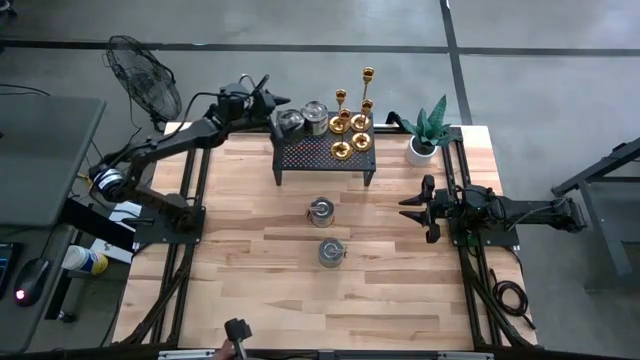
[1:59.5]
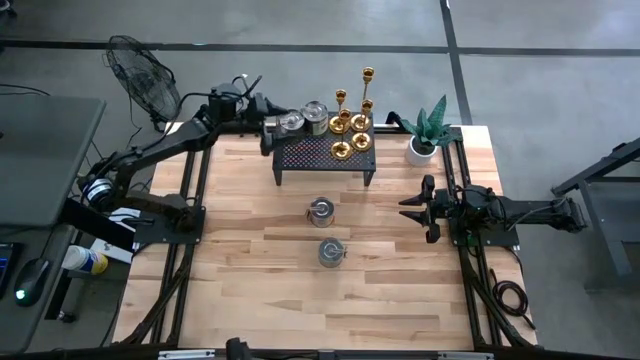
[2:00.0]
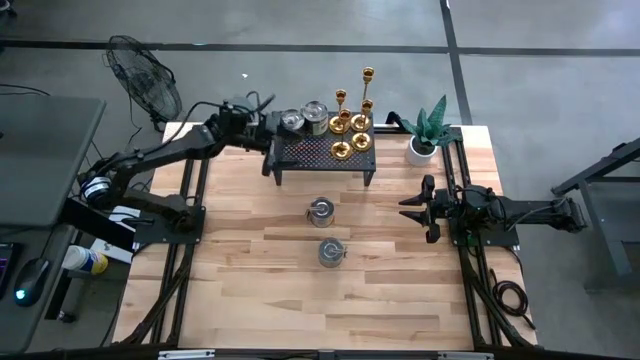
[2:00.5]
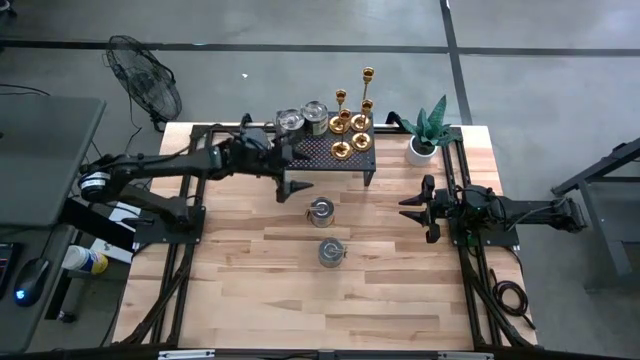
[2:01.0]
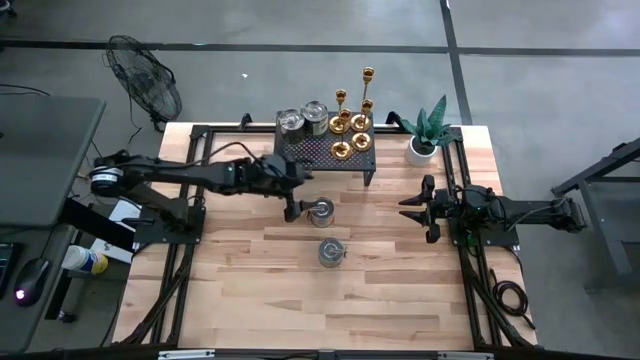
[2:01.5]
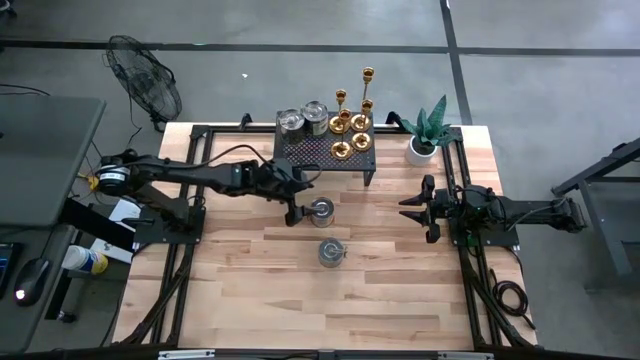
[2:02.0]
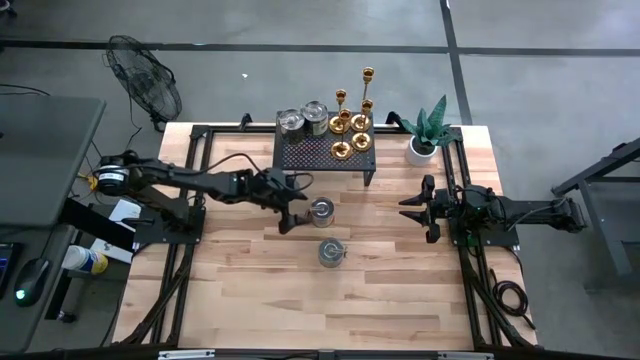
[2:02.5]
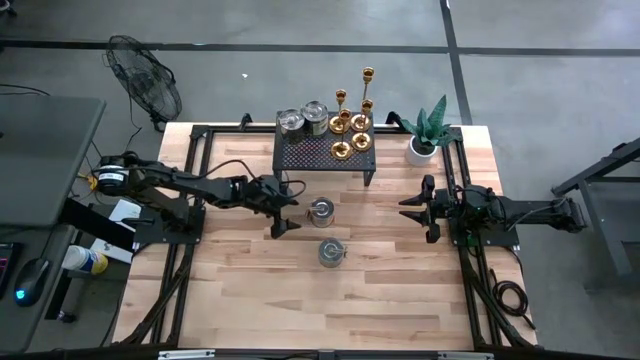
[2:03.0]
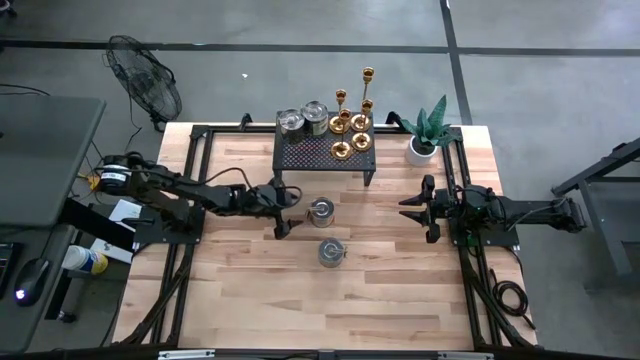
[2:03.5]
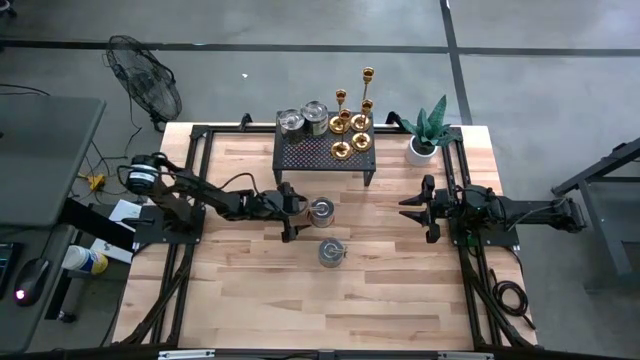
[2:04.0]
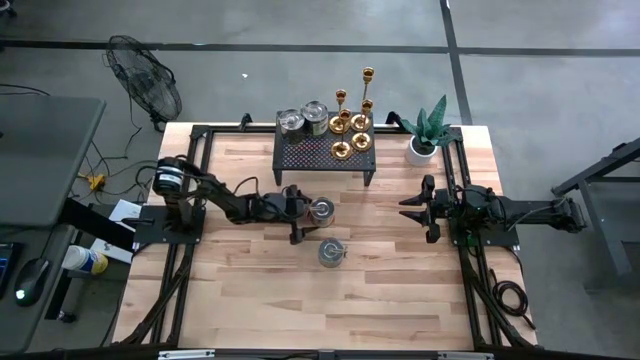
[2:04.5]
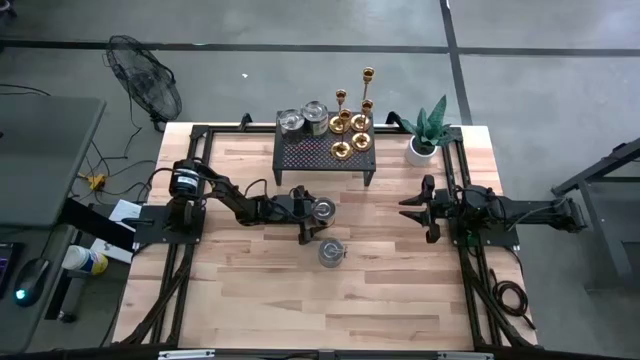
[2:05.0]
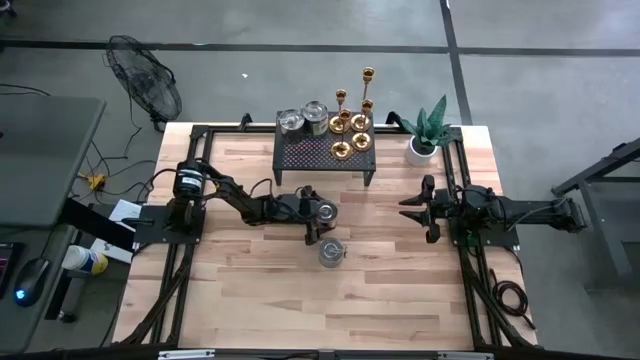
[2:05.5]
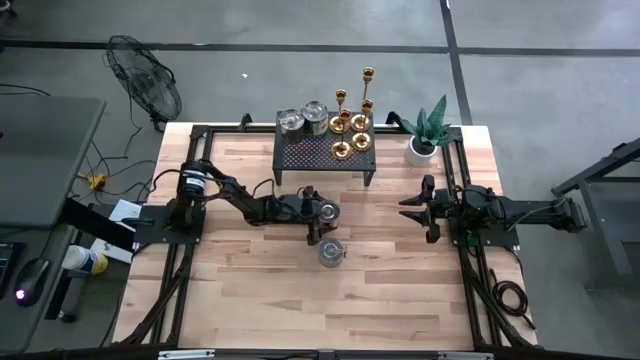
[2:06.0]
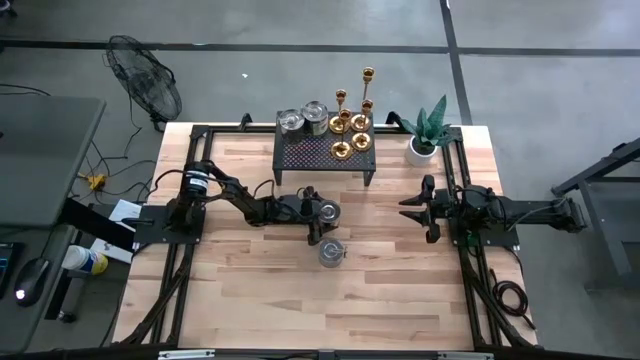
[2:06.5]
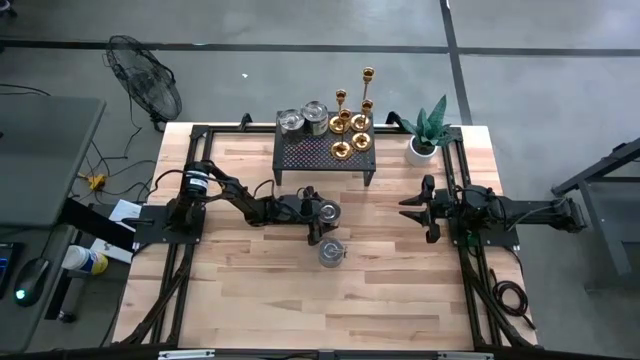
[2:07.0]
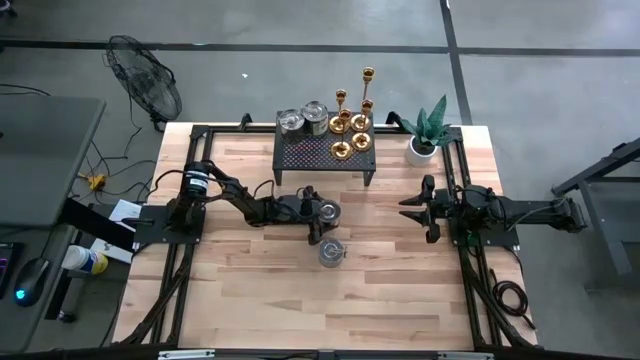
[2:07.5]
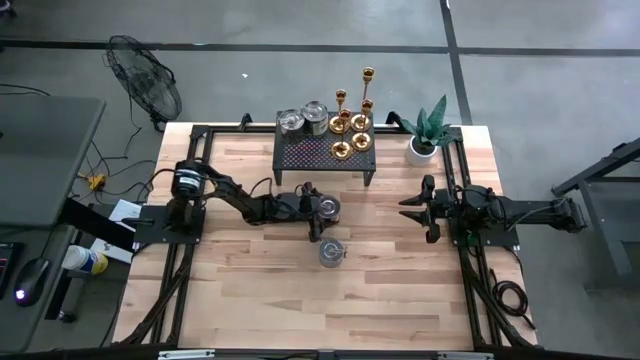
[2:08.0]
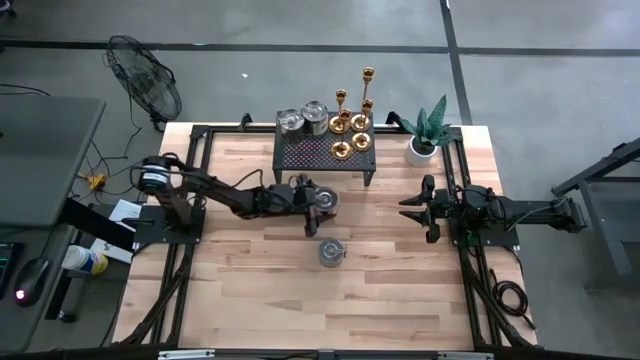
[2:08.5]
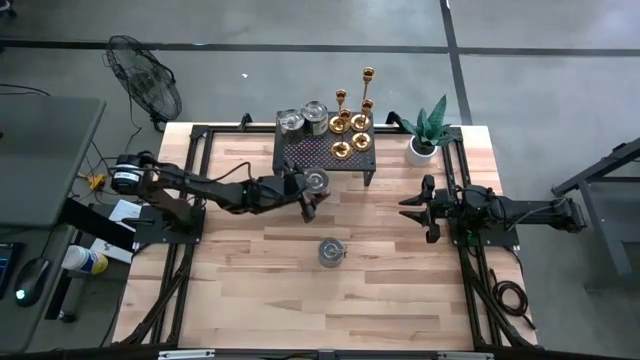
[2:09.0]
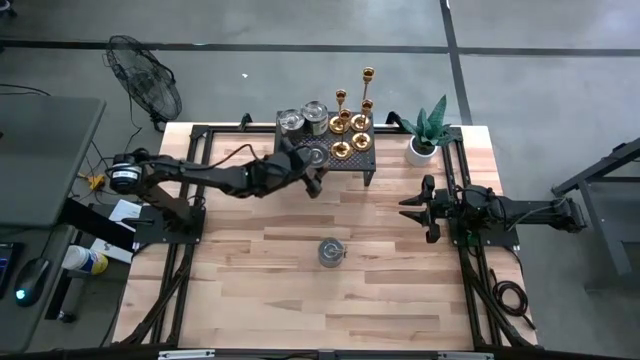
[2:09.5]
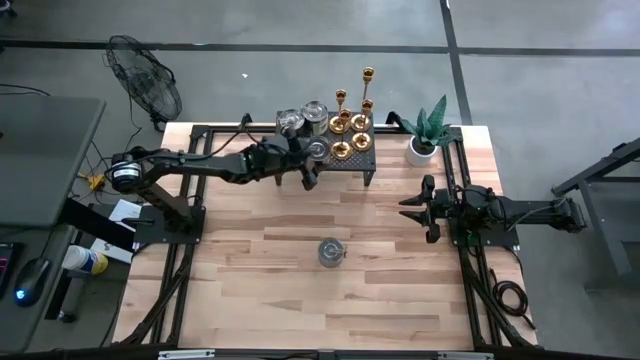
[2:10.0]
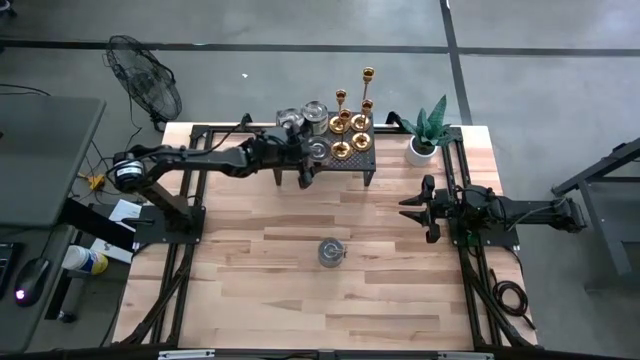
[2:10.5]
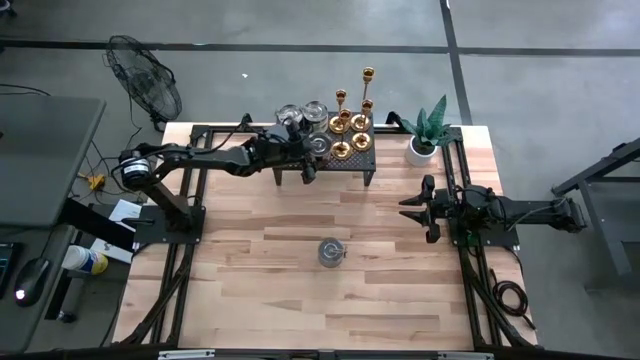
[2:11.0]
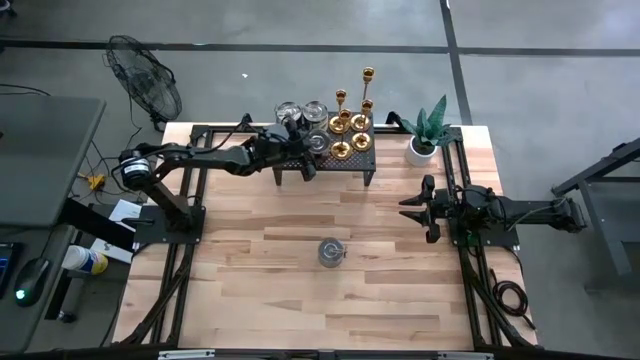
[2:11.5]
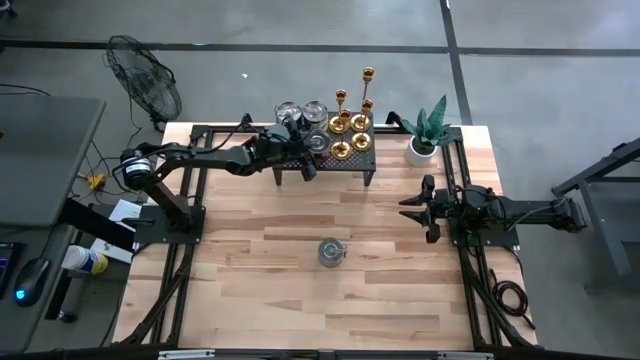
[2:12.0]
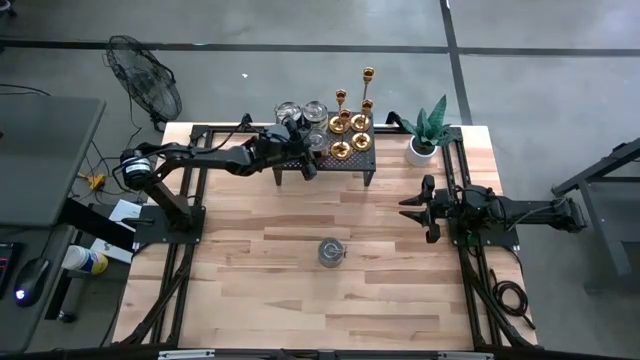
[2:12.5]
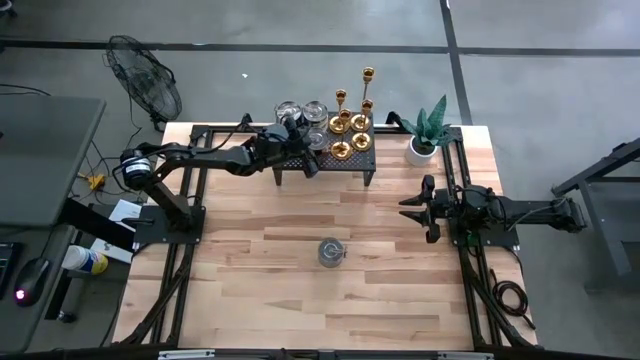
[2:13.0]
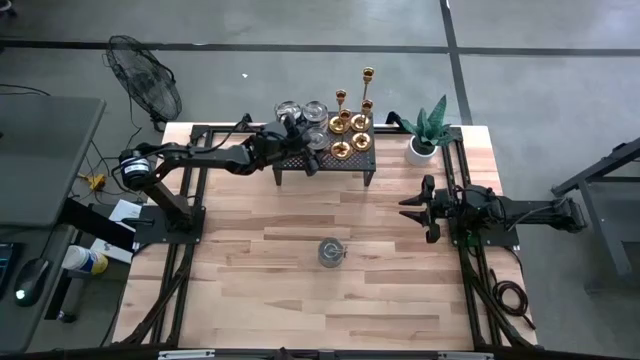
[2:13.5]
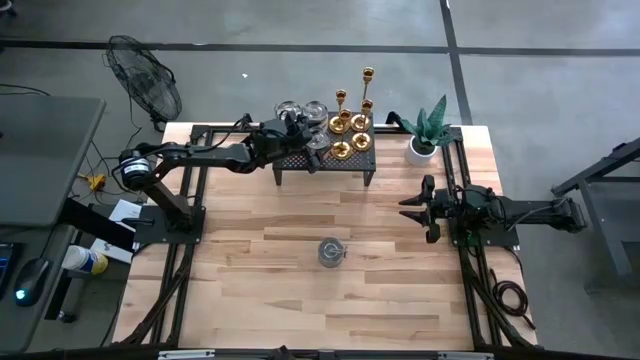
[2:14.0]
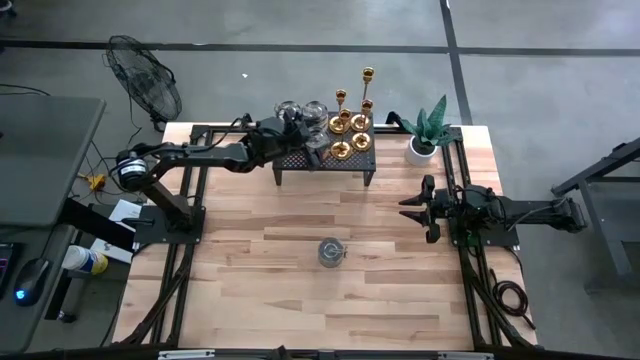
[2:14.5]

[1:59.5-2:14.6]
Task: Pick & Place candle stick holders
Put the scented candle on the shelf

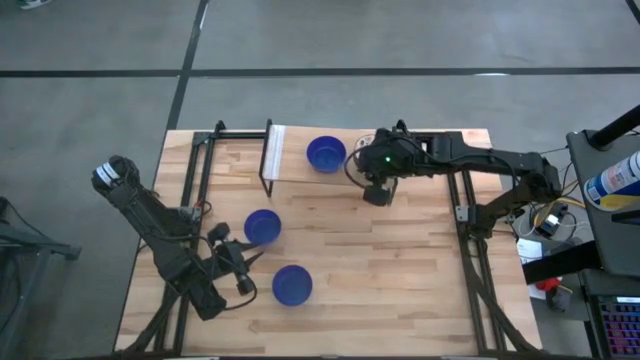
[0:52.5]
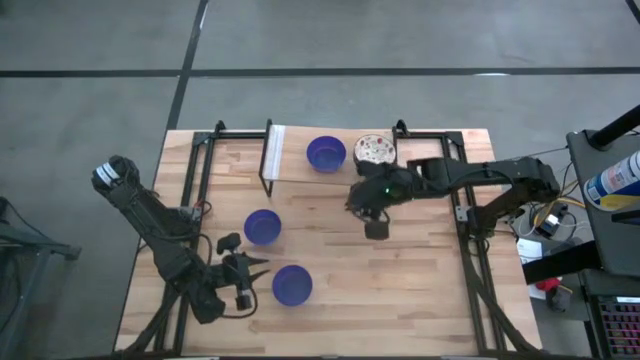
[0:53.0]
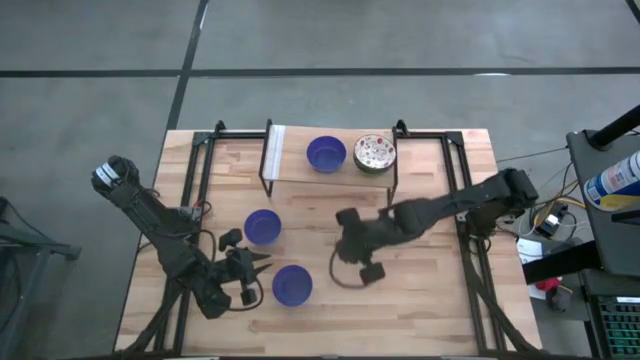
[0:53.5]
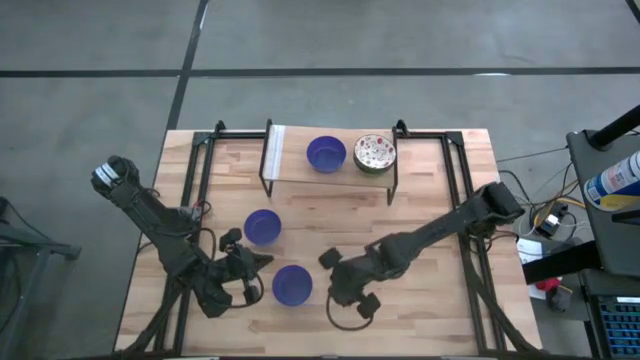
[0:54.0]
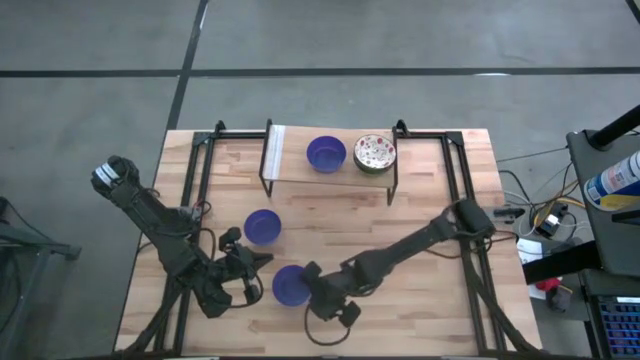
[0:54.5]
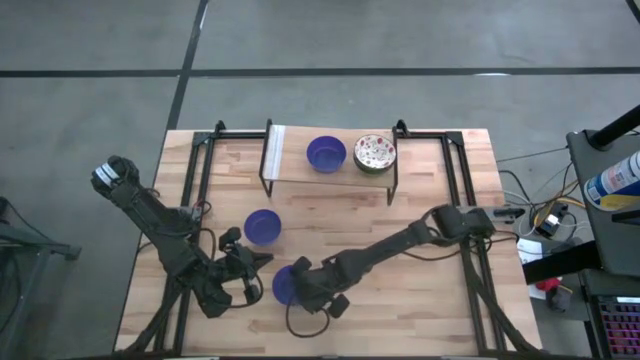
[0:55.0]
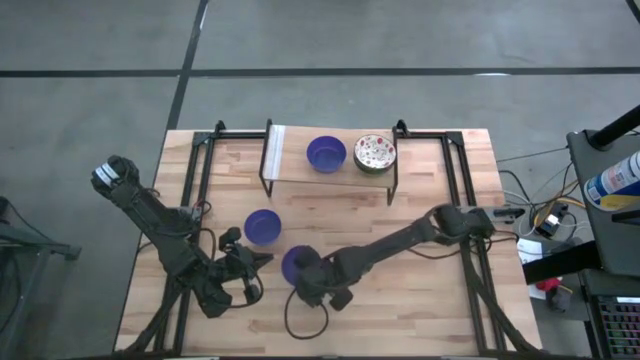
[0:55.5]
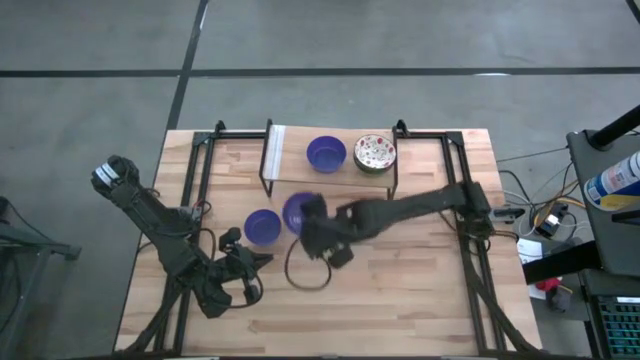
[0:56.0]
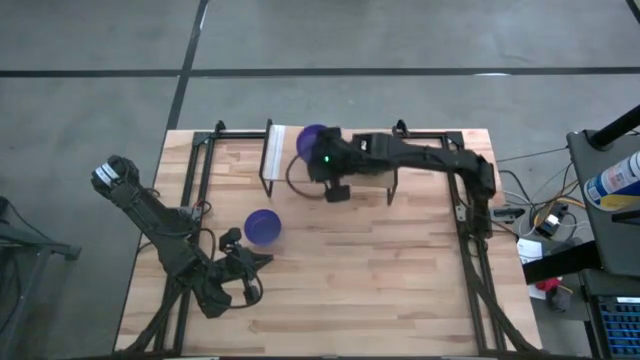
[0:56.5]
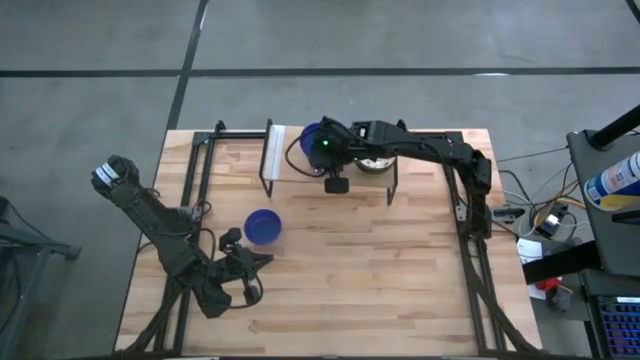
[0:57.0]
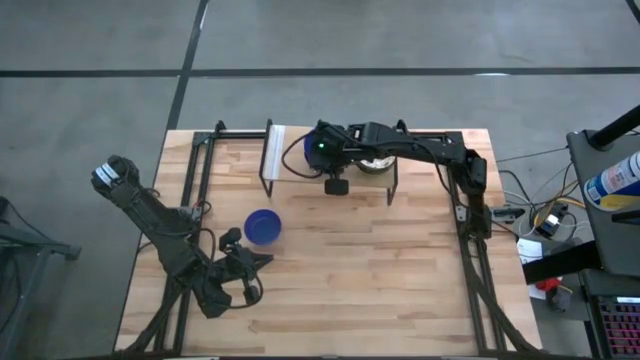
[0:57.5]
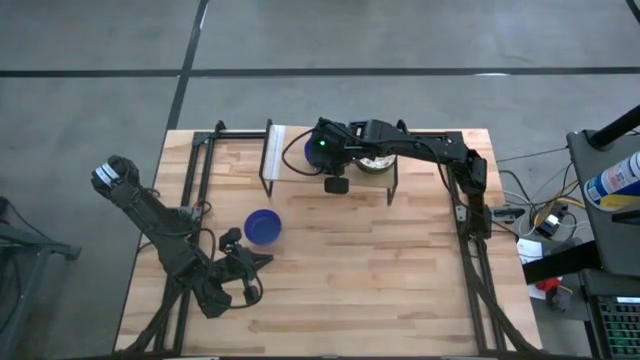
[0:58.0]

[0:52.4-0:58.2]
Task: Pick & Place Mini bowls
Stack the bottom blue bowl on top of the blue bowl on the shelf
